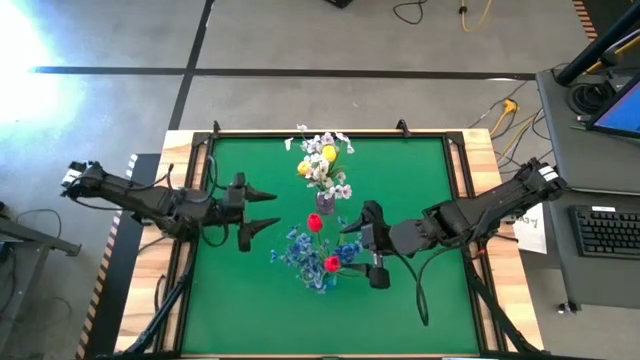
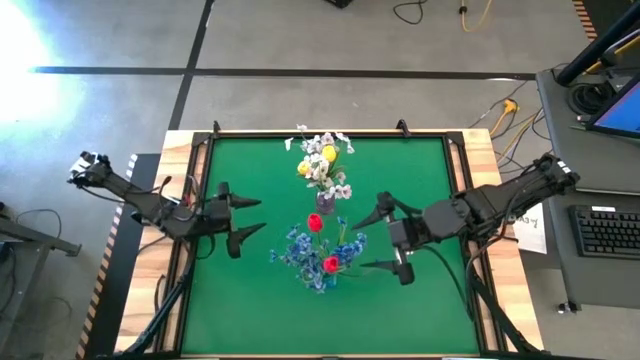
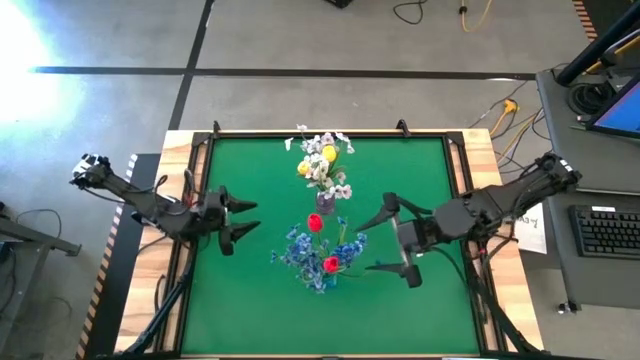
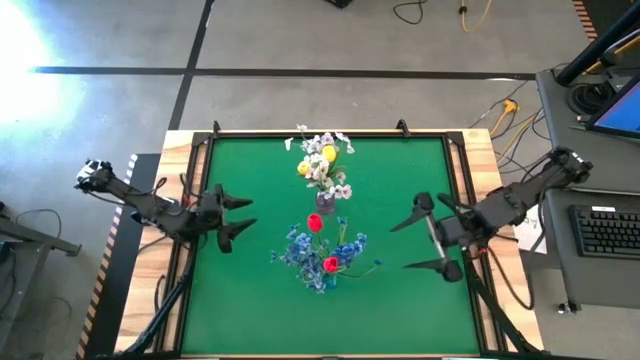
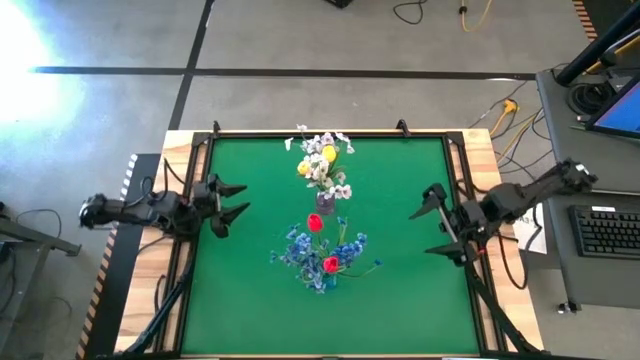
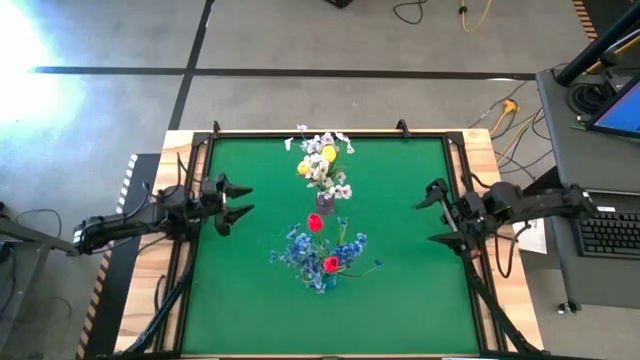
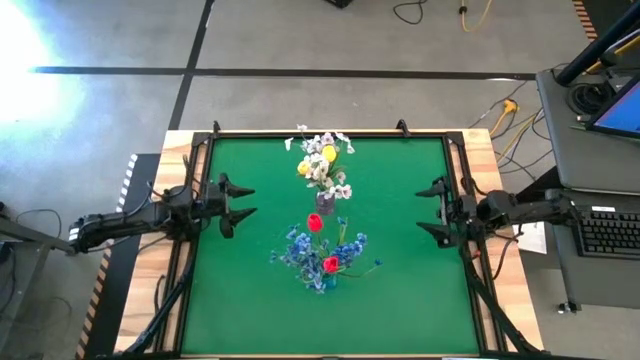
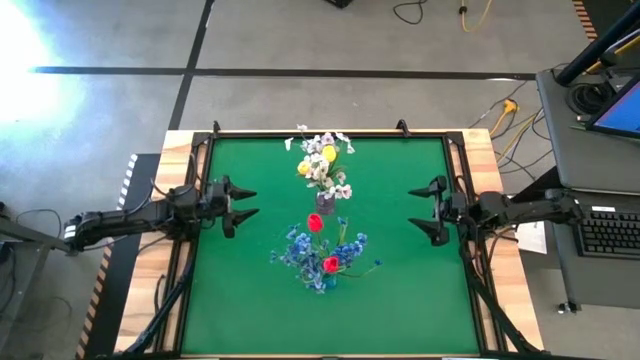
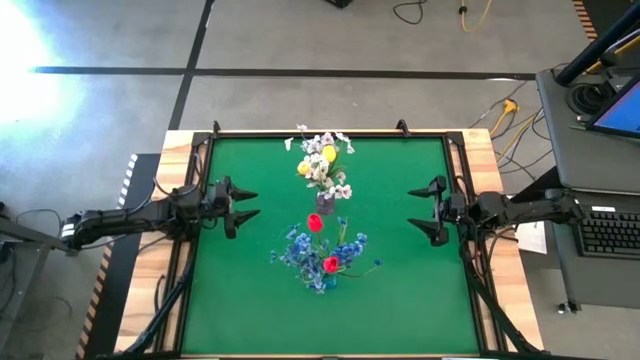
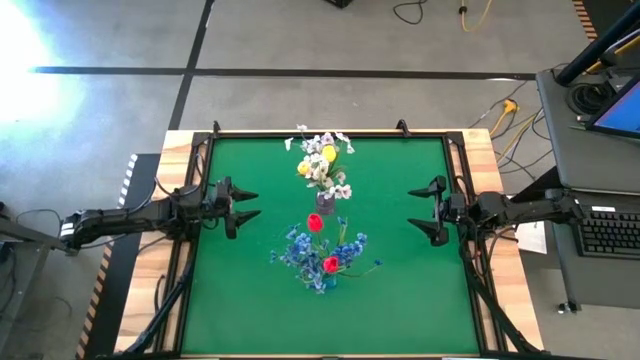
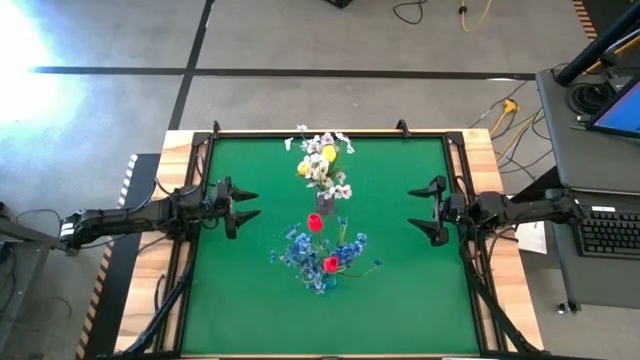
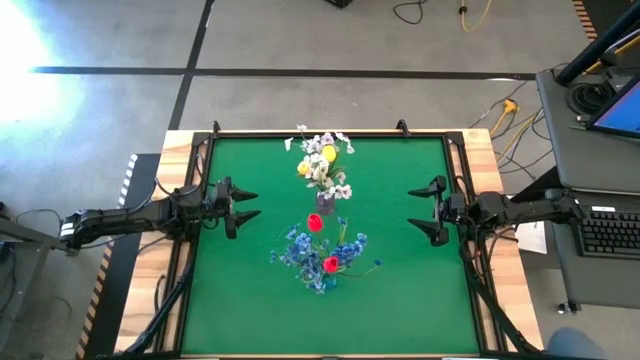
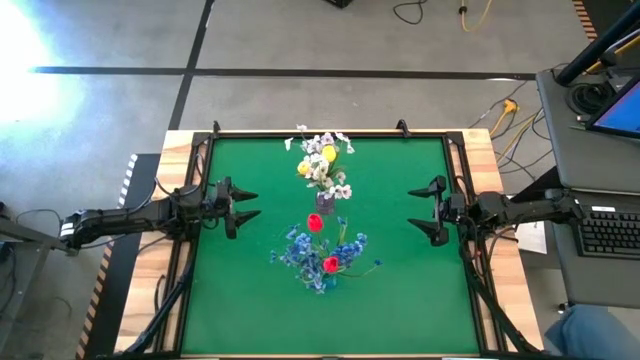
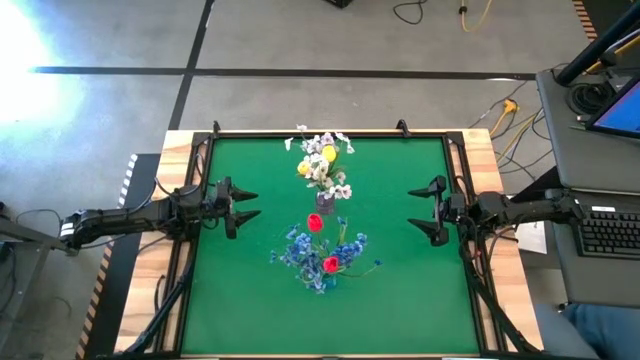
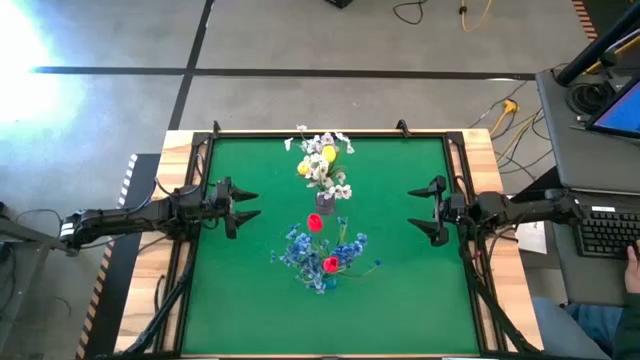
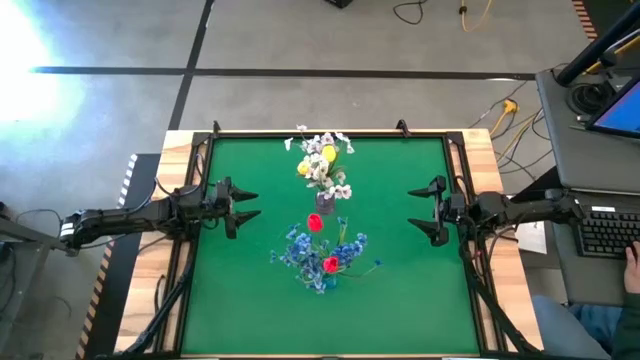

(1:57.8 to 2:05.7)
Task: Sort flowers into vase by color
Return to Home Position

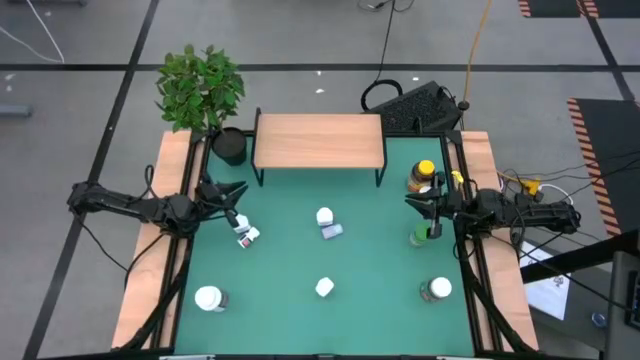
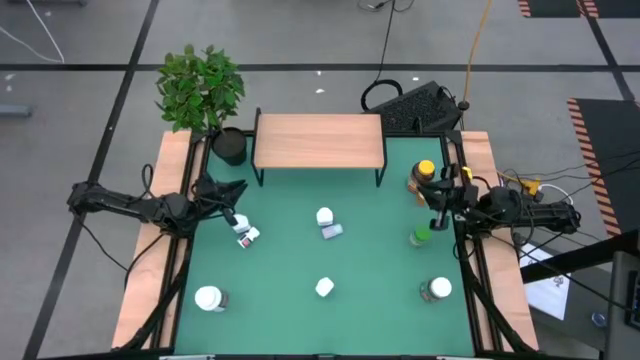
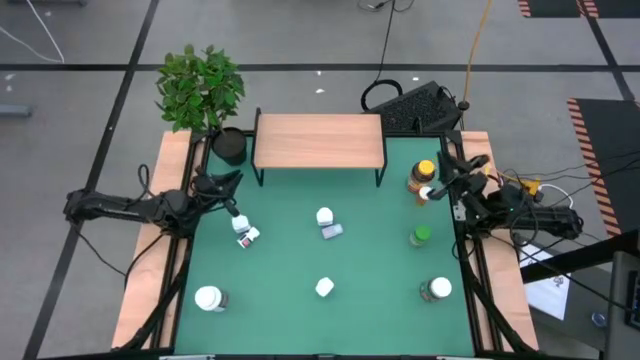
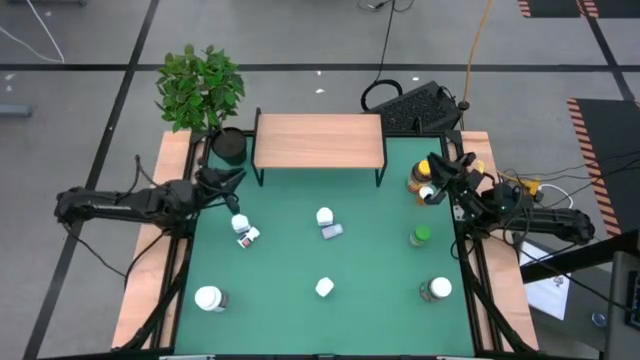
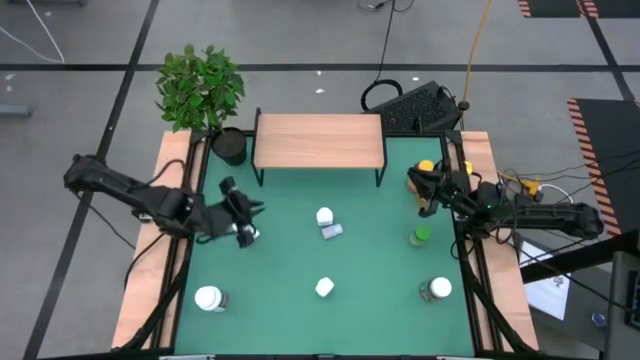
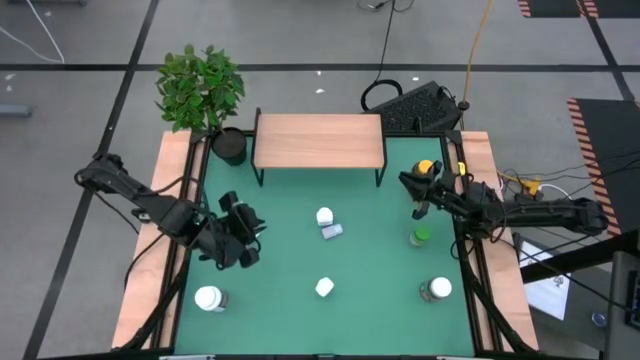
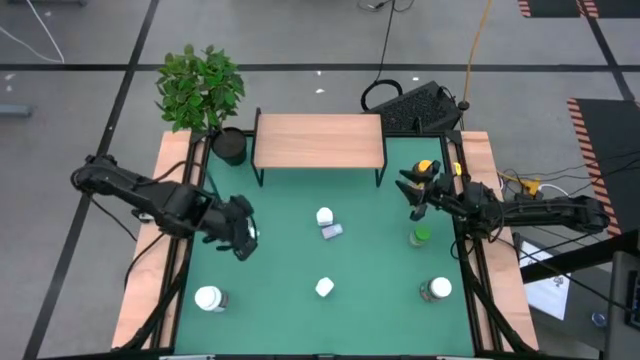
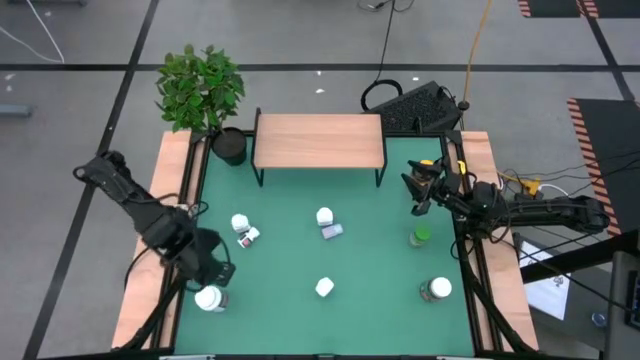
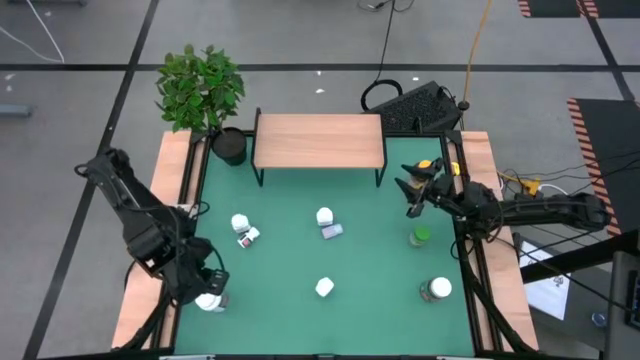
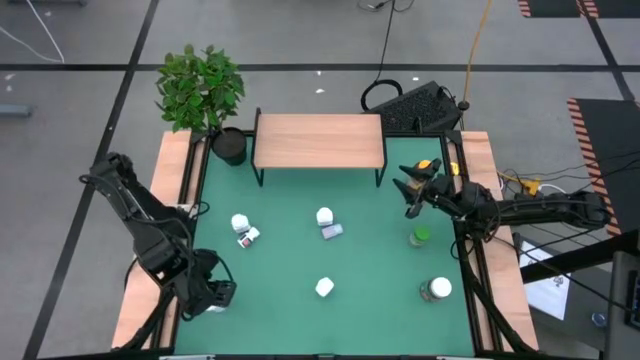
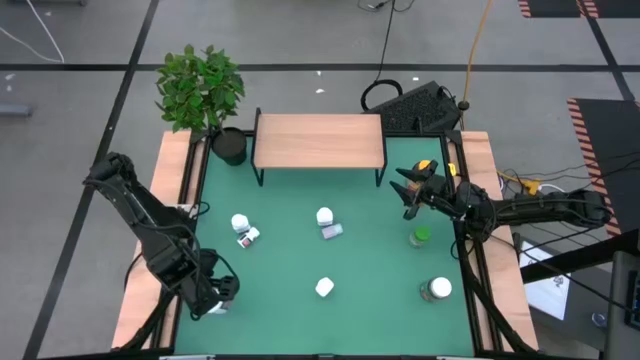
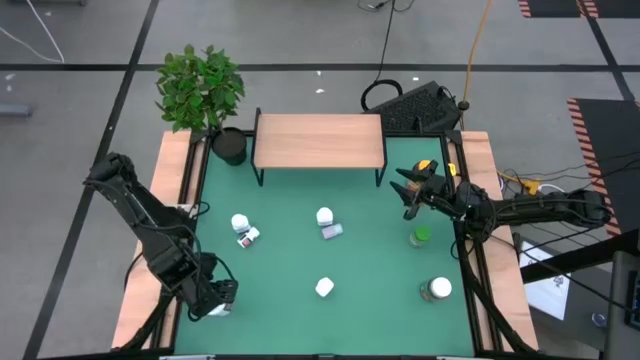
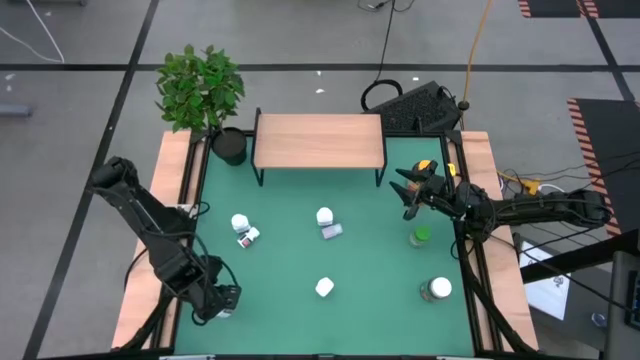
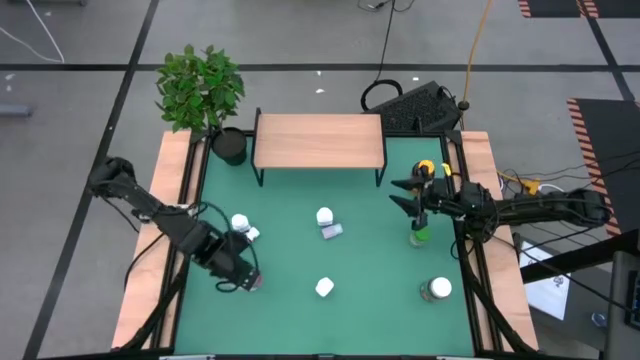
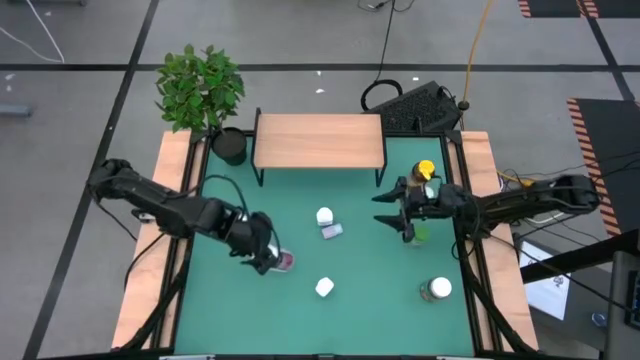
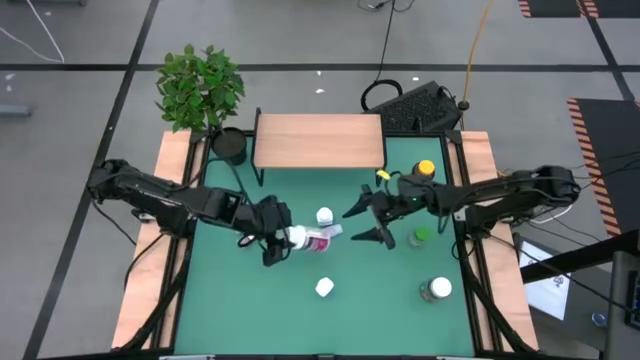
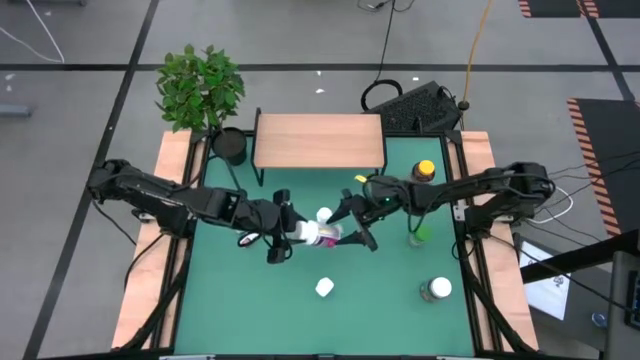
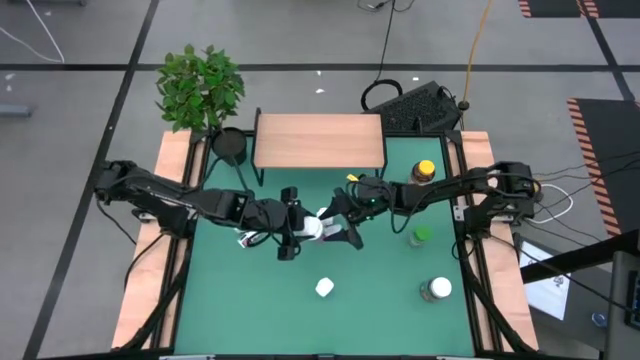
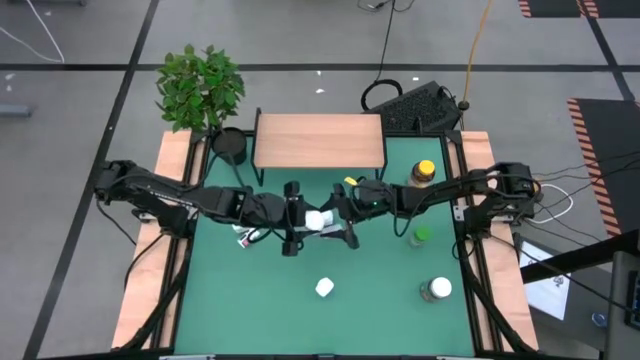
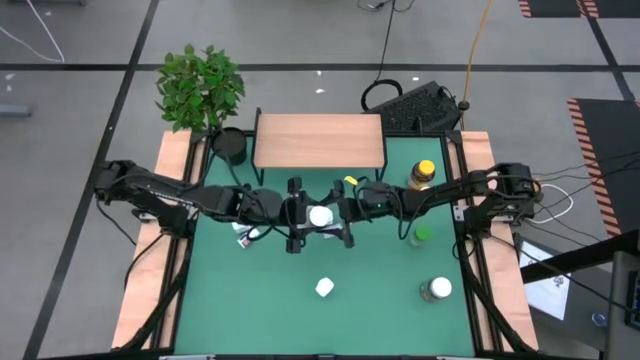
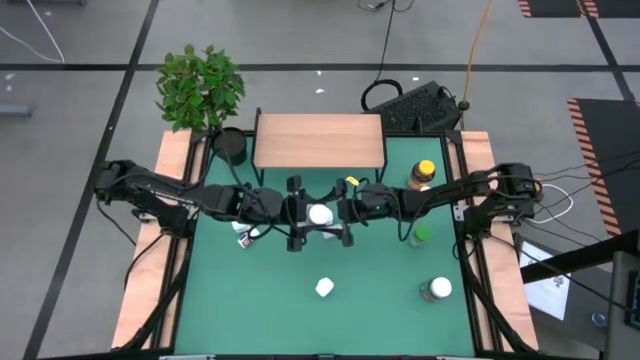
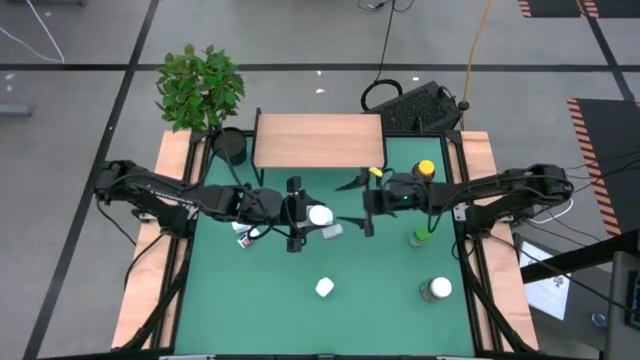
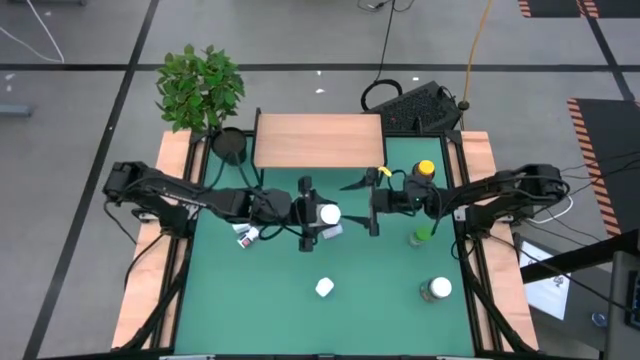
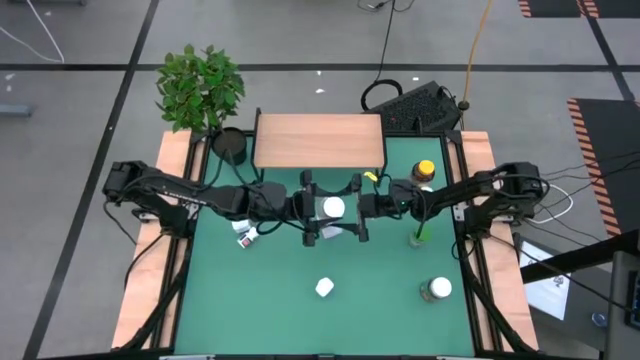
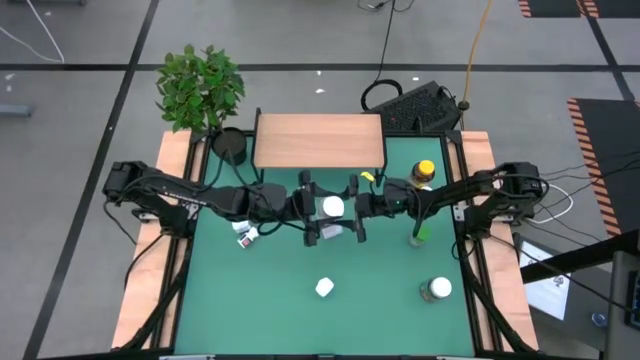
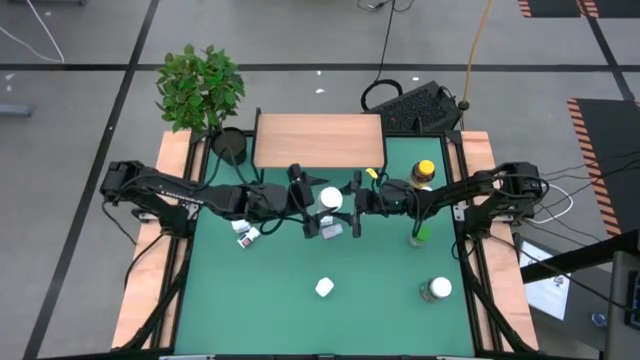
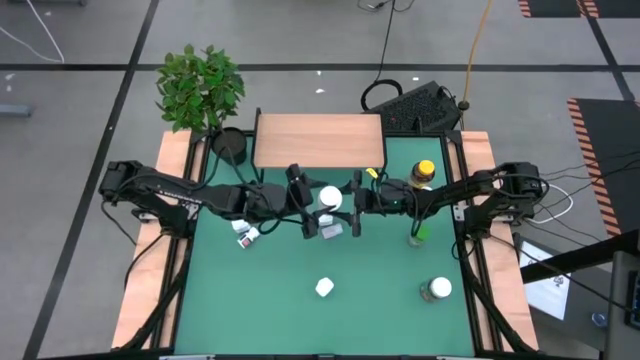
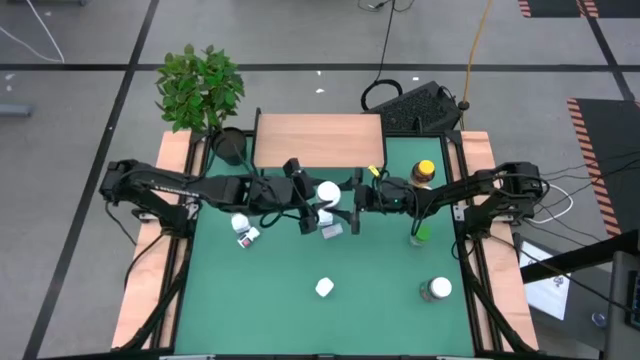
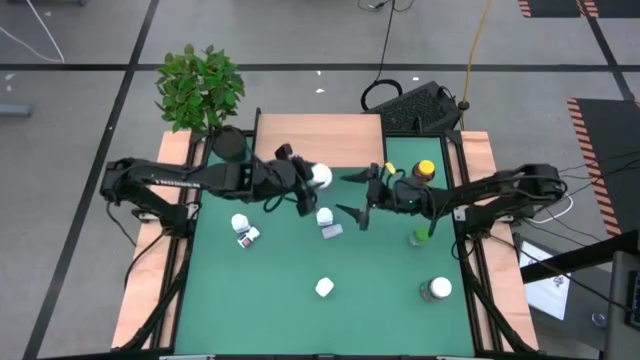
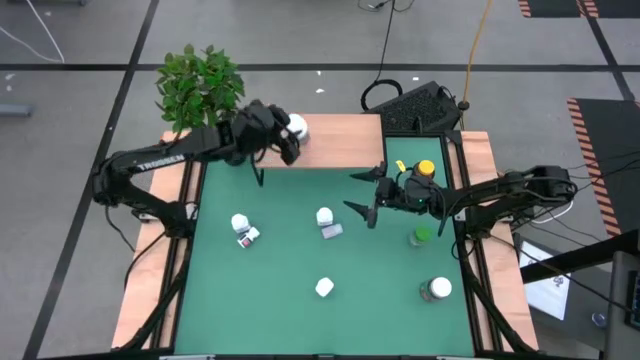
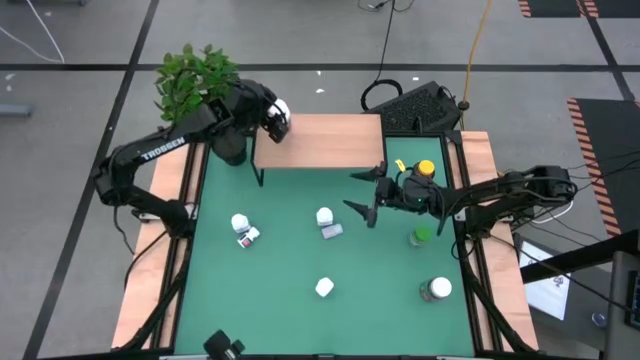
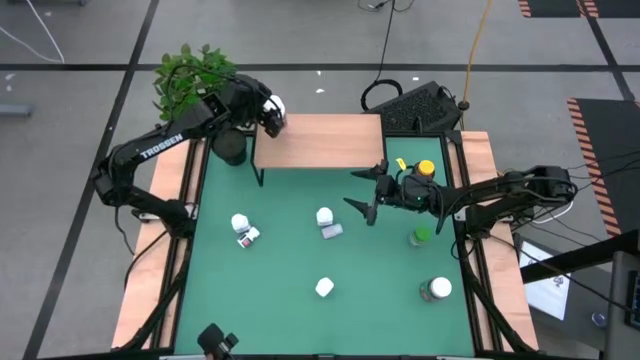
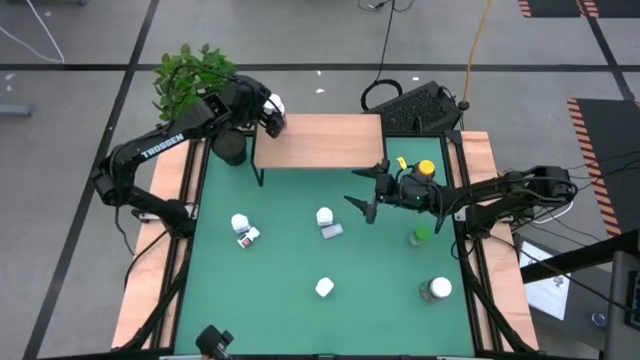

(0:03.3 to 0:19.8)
Task: Pick and place medicine bottles onto shelf by color
Put the violet pill bottle on the shelf
